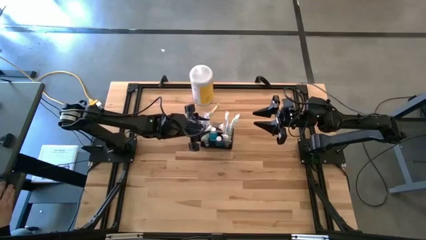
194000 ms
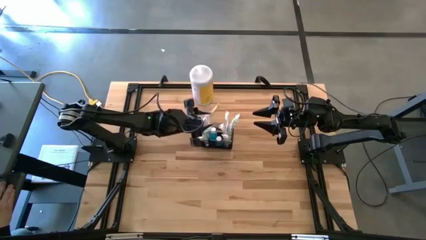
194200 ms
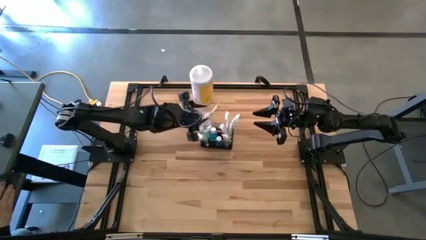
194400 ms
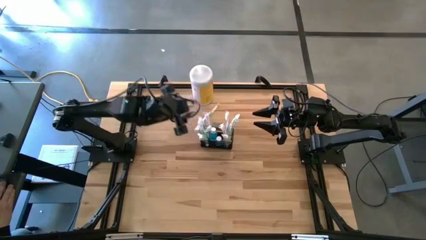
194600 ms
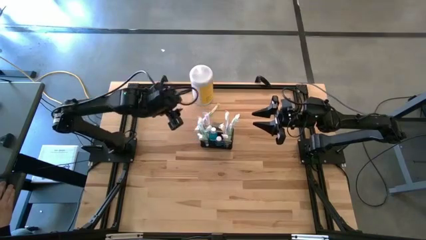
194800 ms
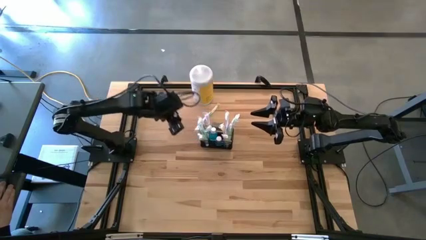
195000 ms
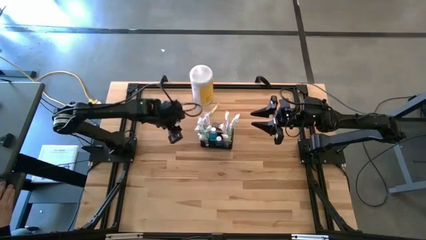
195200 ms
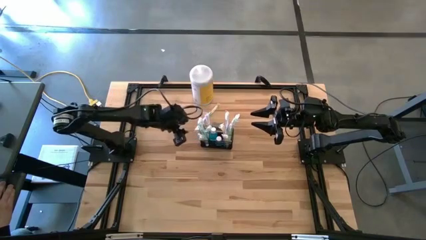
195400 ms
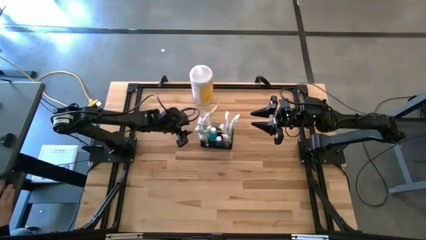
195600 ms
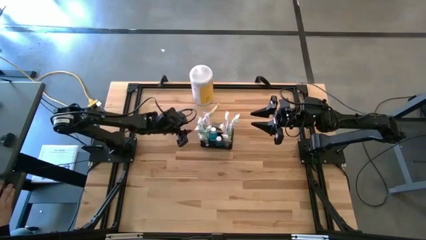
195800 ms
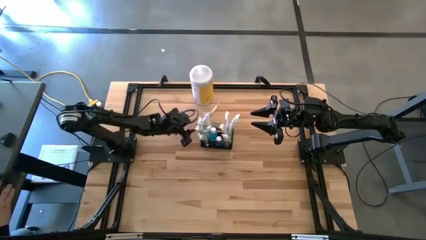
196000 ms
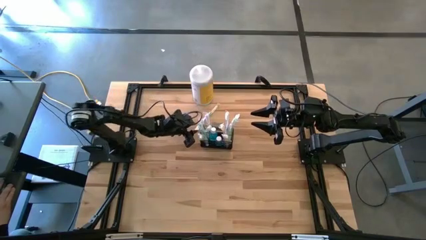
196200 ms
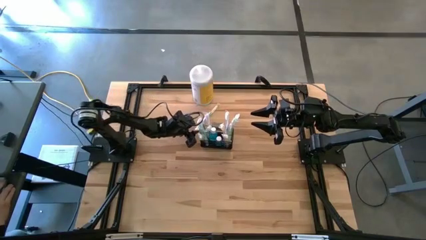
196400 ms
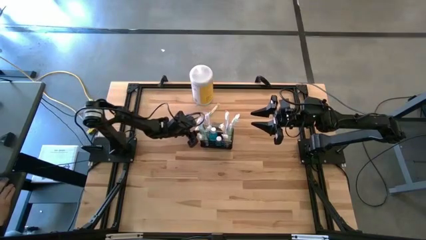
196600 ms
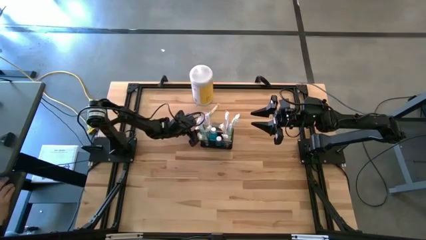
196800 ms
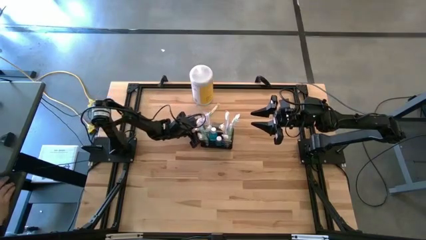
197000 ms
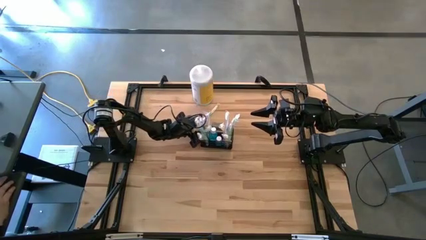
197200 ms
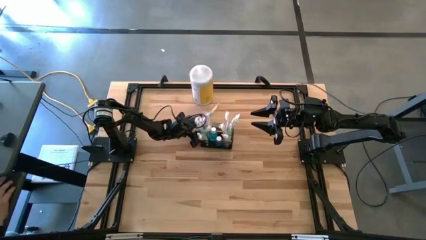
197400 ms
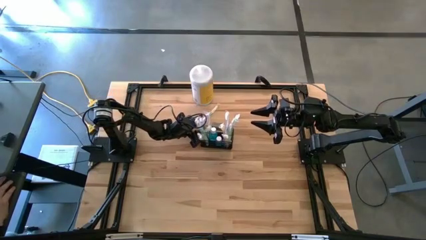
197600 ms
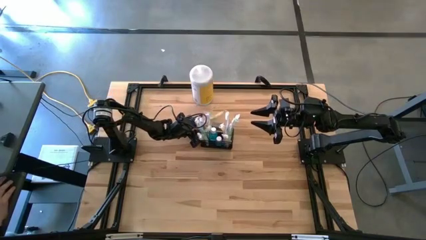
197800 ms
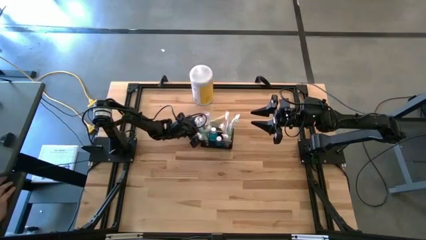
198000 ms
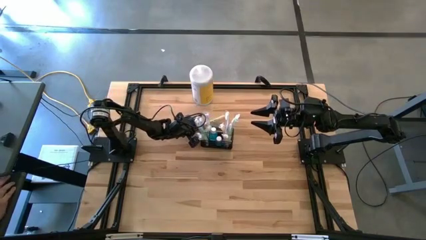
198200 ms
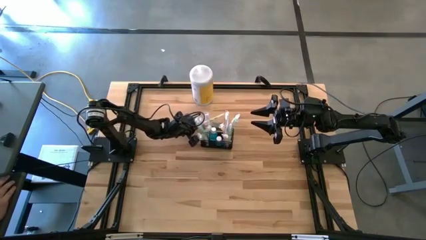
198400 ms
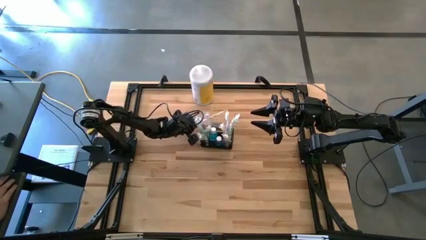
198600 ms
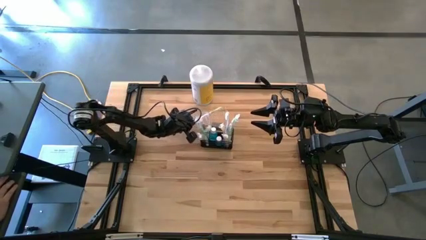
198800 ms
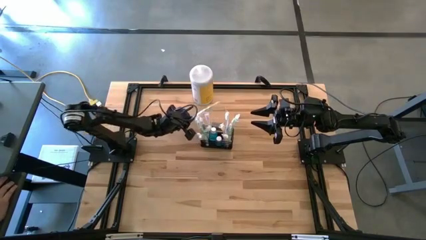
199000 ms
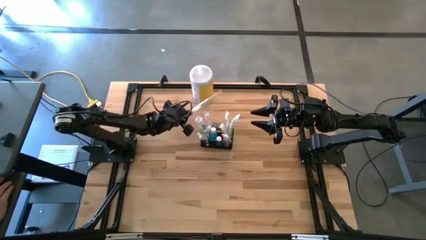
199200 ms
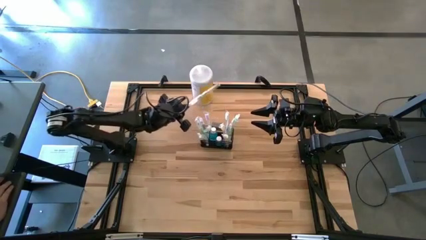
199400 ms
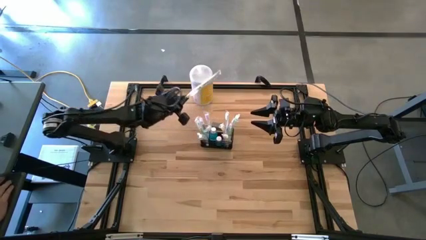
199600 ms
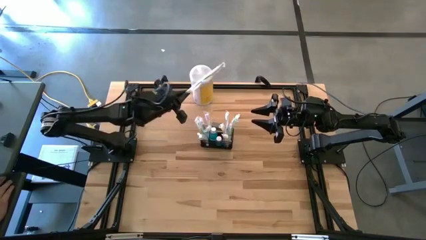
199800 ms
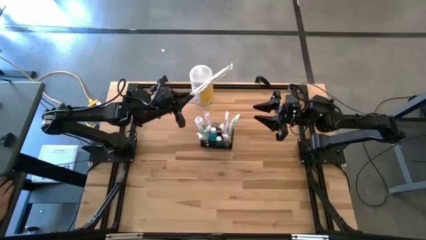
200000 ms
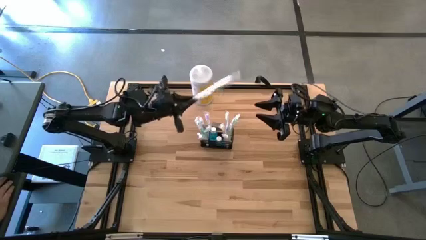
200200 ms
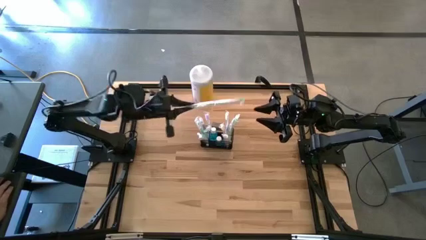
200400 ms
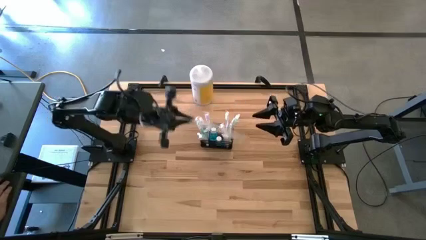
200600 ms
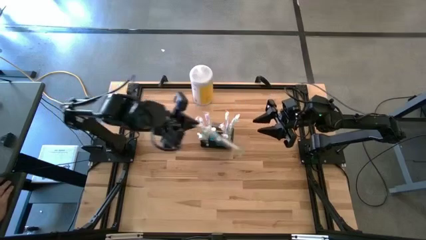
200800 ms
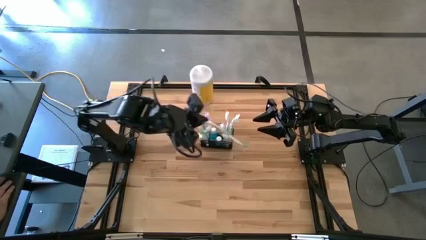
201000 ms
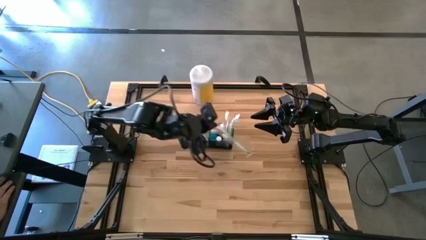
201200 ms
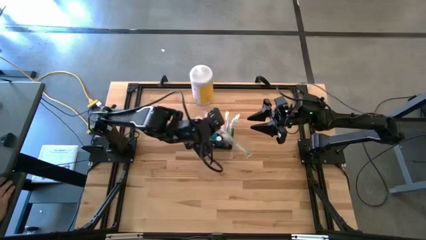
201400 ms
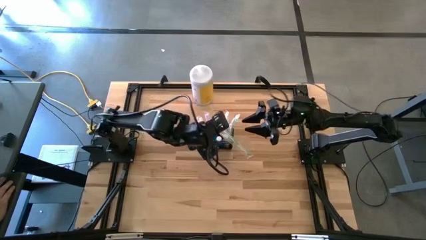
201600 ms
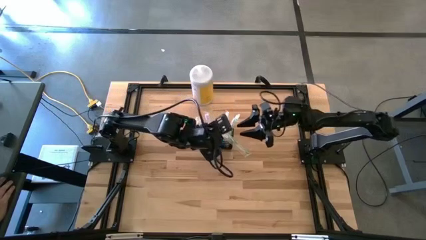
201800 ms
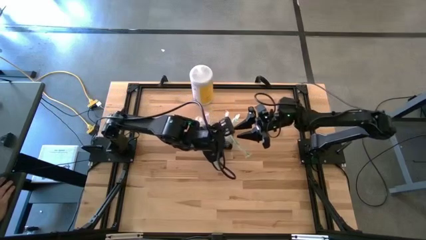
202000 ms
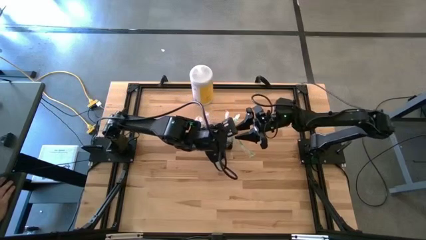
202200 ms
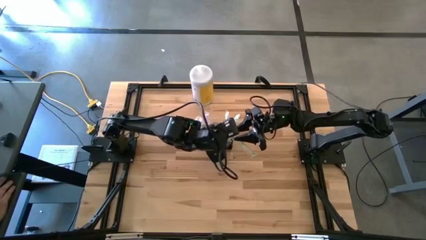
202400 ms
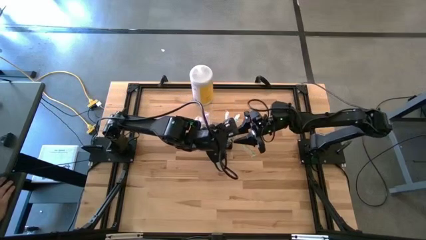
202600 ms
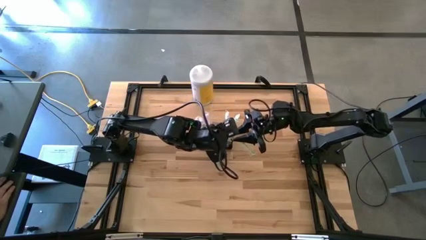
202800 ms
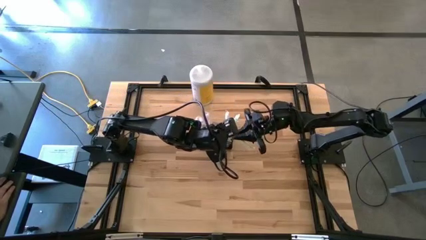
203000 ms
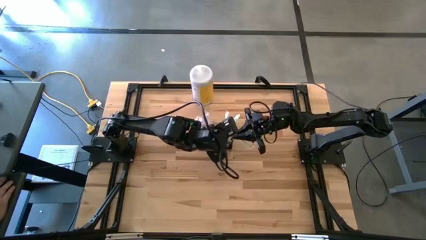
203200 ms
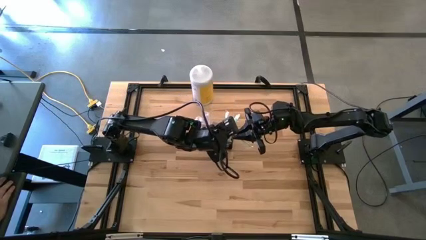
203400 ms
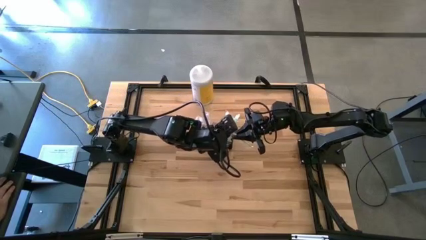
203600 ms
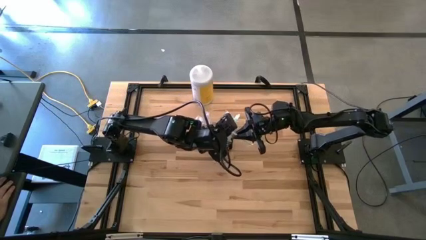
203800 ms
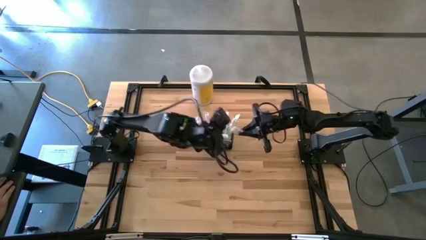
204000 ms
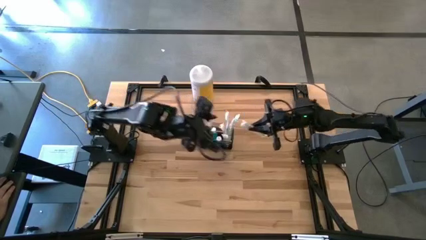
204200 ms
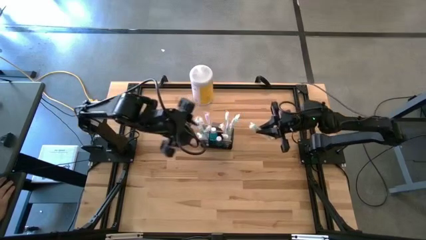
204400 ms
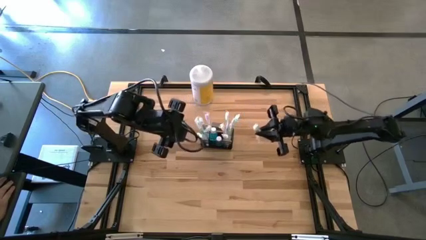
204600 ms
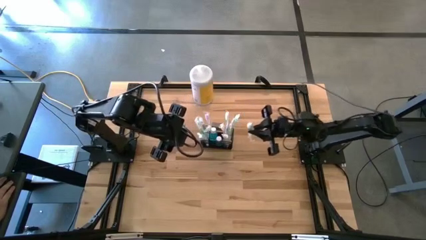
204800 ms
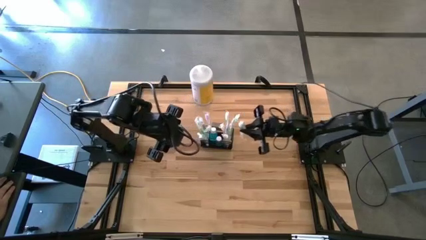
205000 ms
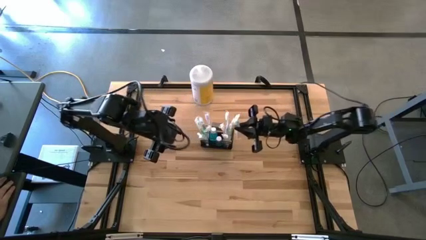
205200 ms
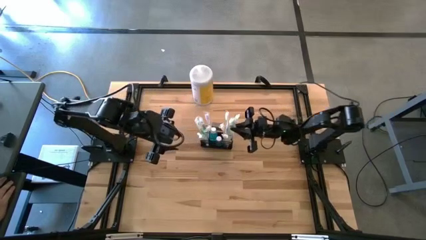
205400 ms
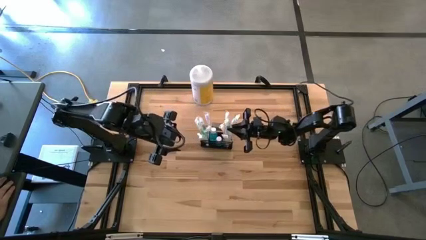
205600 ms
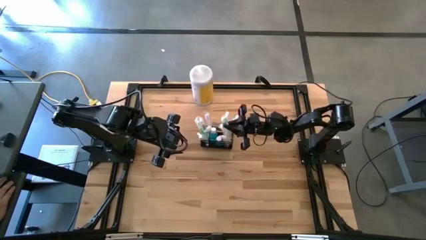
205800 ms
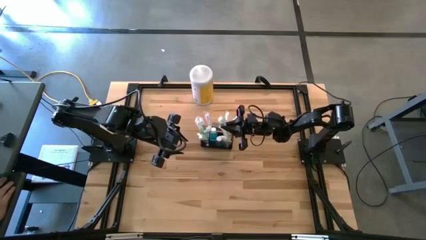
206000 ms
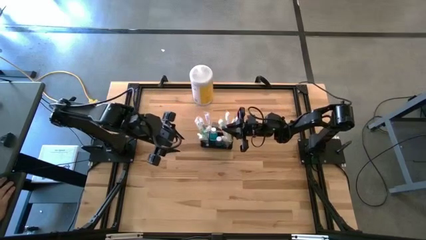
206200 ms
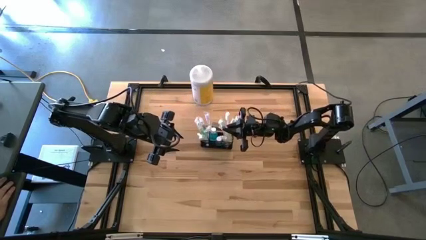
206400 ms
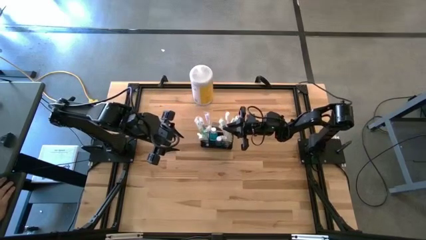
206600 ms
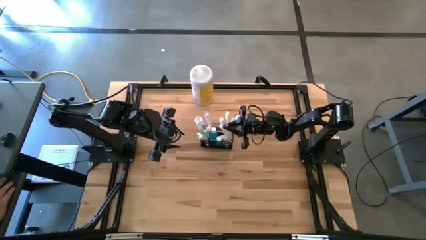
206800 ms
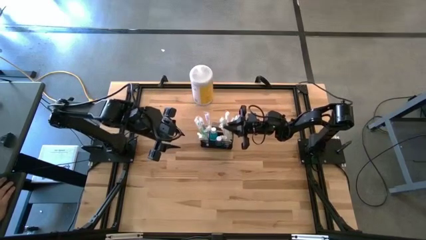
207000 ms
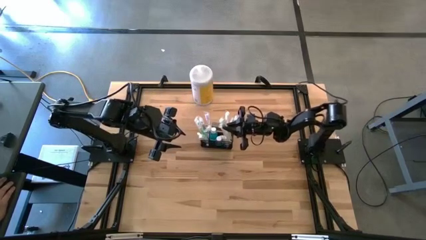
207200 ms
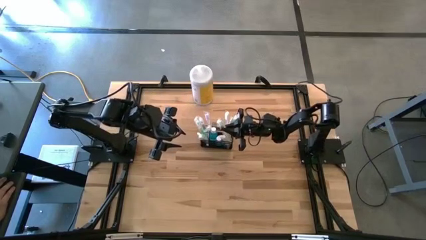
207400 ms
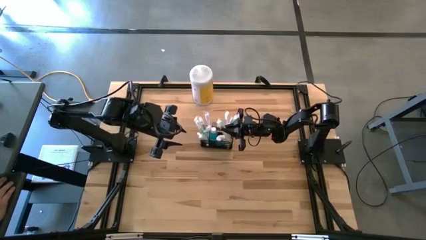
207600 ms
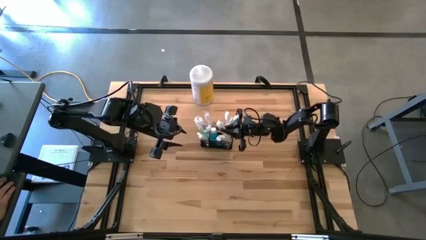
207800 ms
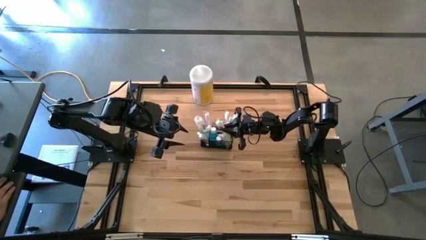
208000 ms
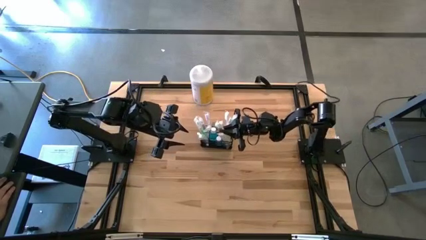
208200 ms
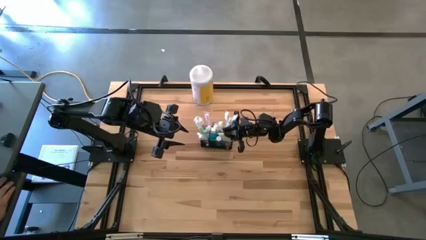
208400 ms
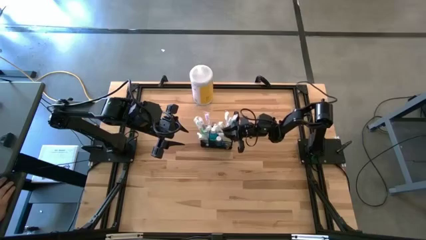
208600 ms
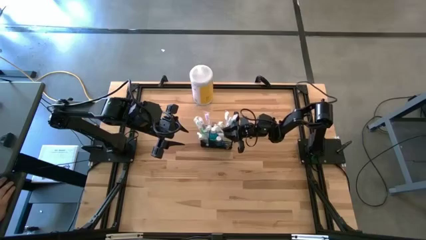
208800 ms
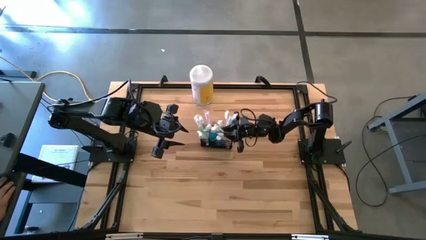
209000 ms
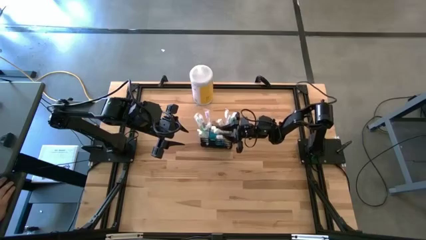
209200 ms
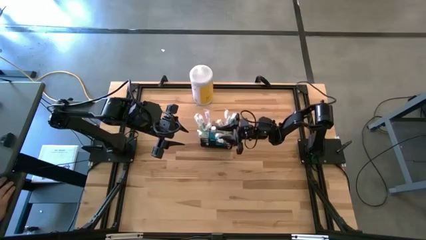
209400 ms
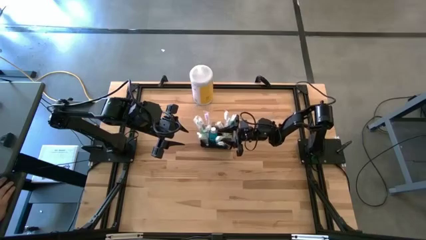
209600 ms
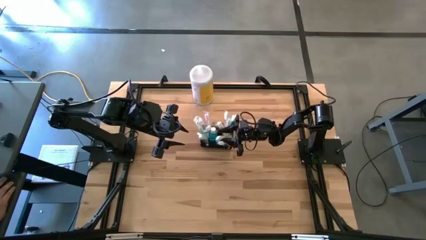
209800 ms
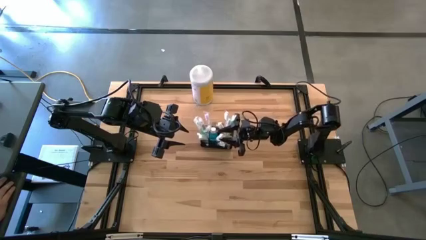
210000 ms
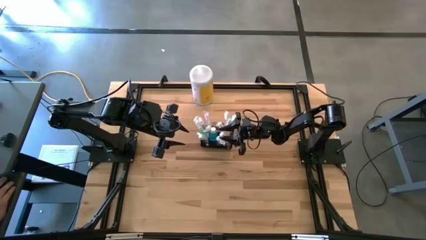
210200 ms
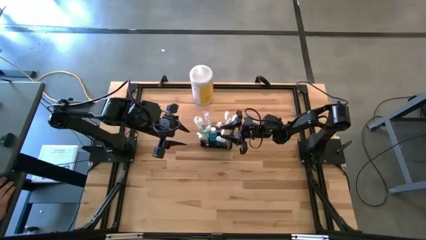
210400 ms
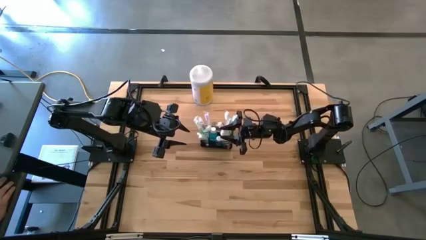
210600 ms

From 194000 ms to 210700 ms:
Task: Pick & Place toothbrushing station
Put the green toothbrush into the right section wire organizer
